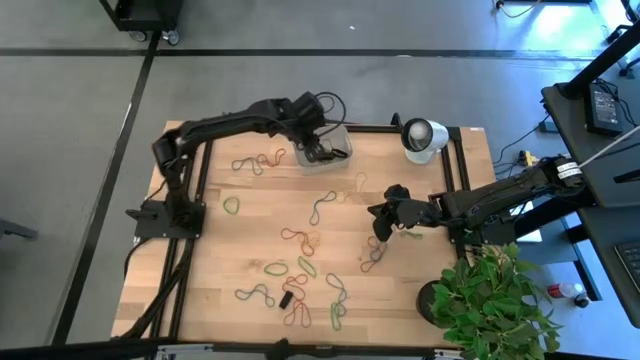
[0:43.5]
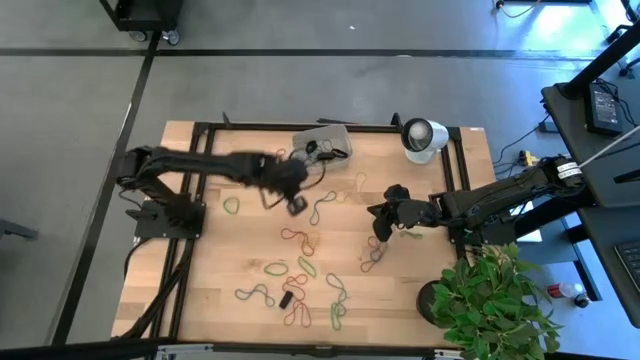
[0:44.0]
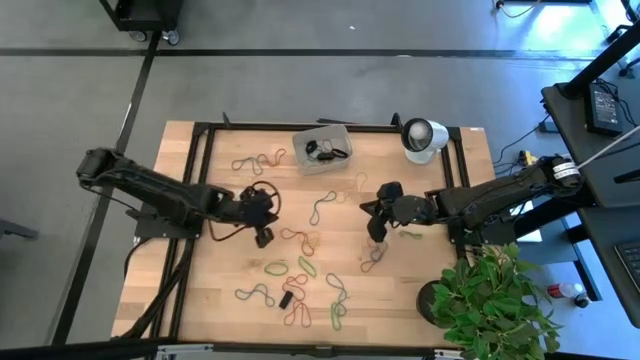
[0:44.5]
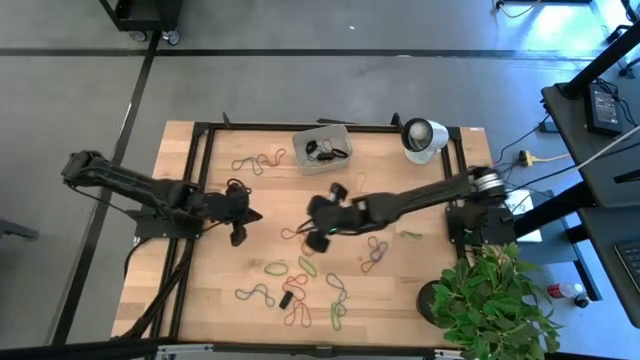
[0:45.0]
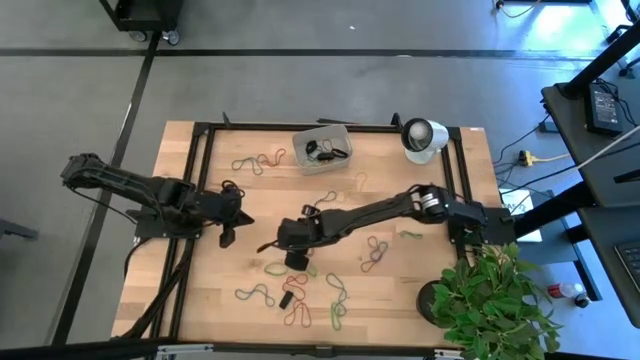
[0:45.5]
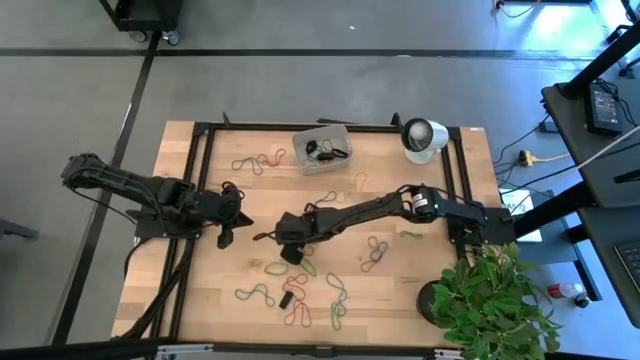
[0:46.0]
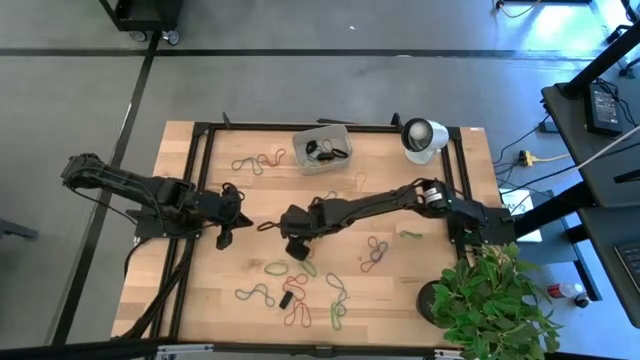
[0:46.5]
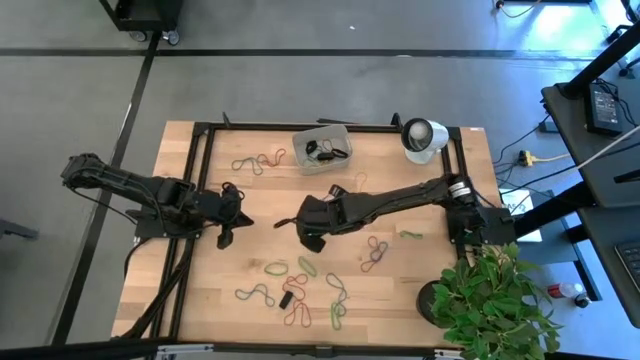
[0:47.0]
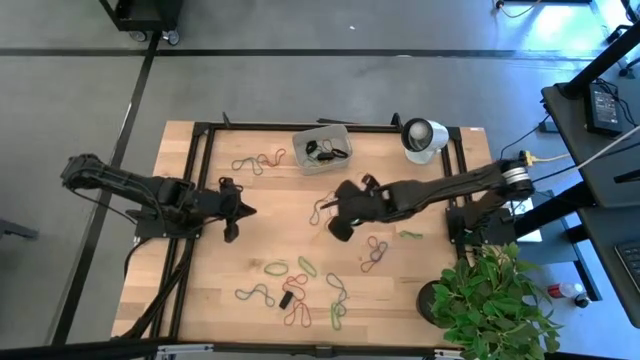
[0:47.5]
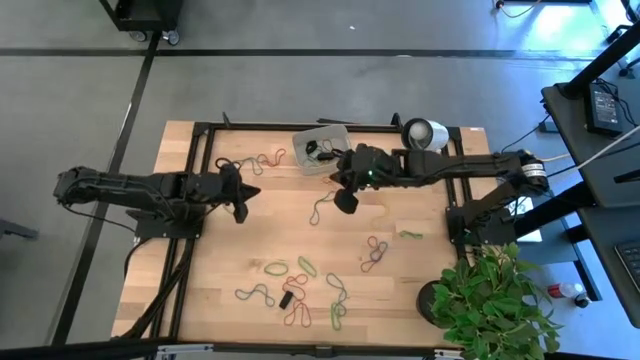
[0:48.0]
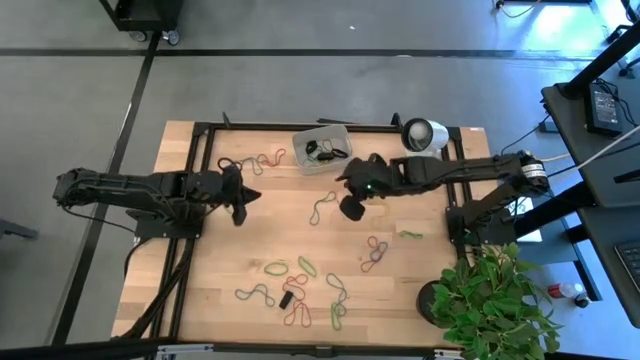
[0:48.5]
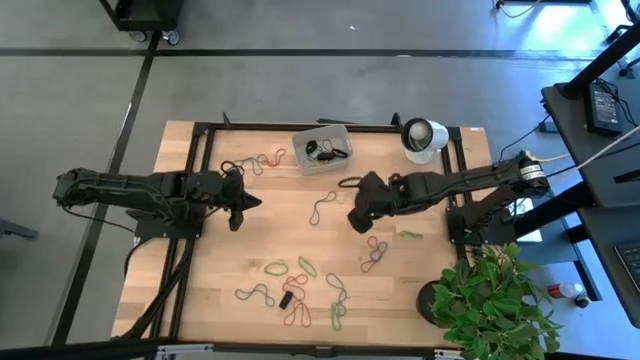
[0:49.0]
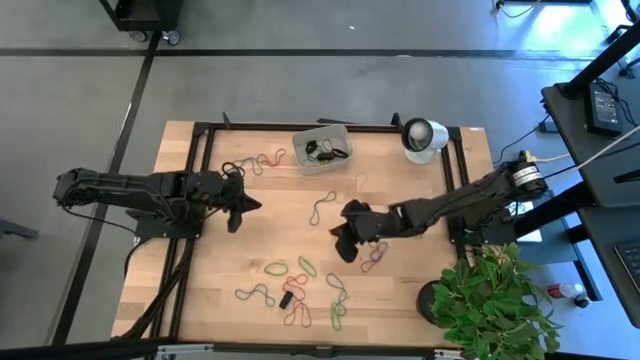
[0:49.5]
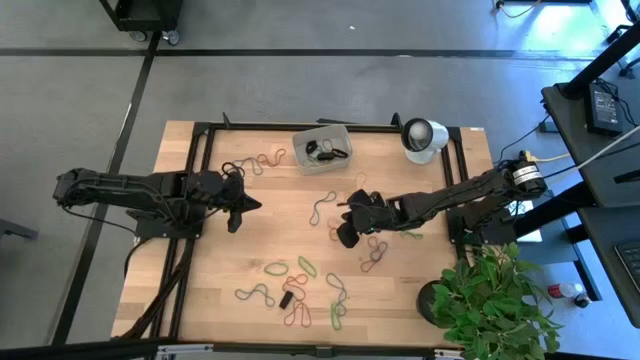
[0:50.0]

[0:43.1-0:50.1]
Task: Pick and place rubber bands into bin
Put the red rubber band into the gray bin

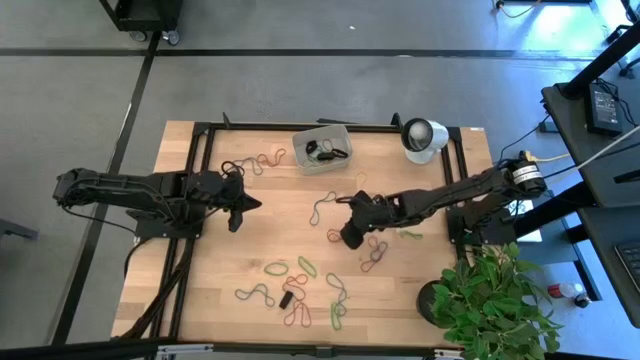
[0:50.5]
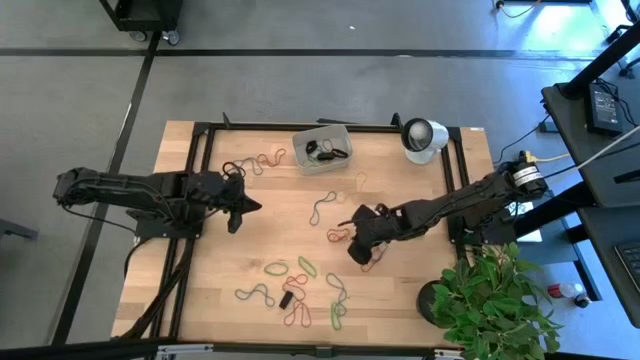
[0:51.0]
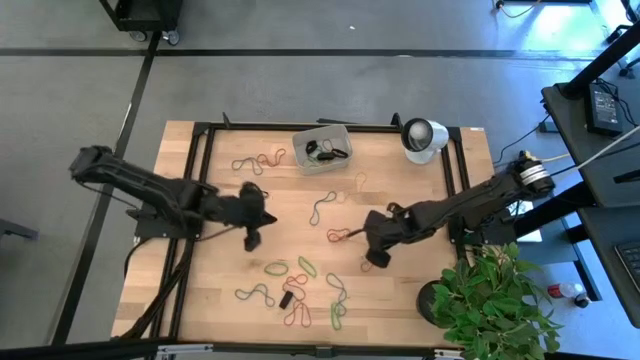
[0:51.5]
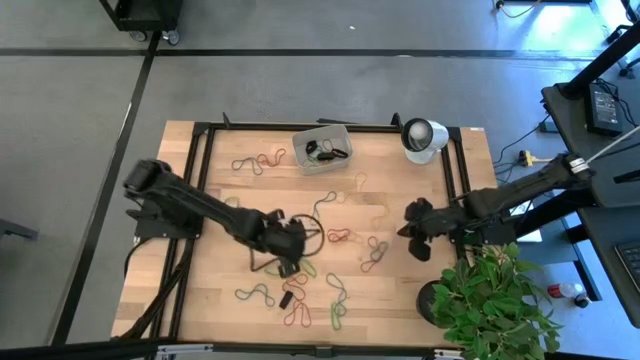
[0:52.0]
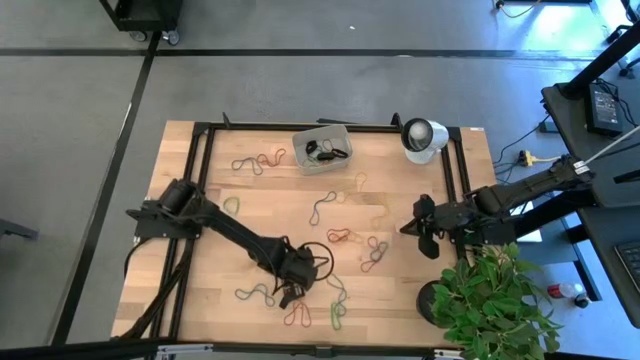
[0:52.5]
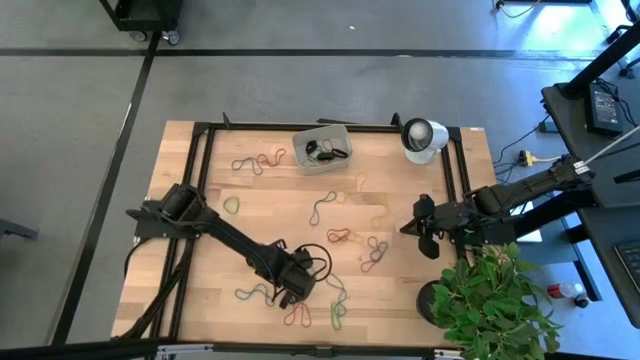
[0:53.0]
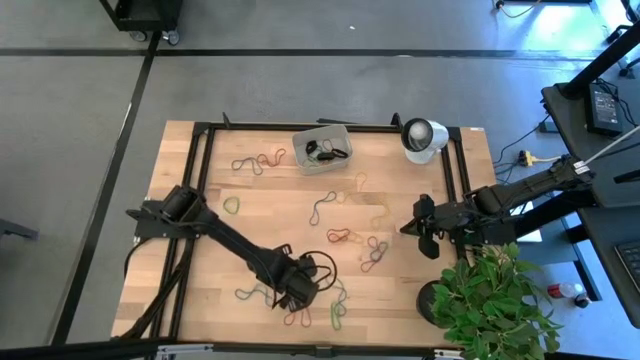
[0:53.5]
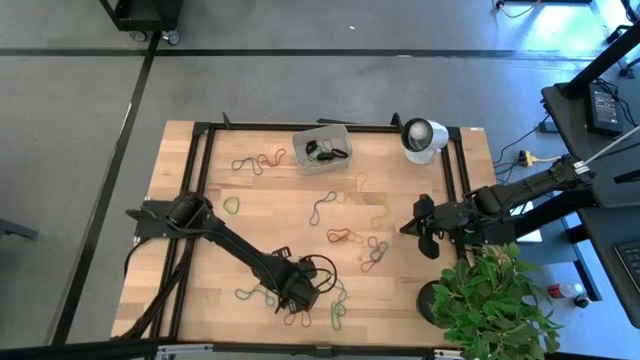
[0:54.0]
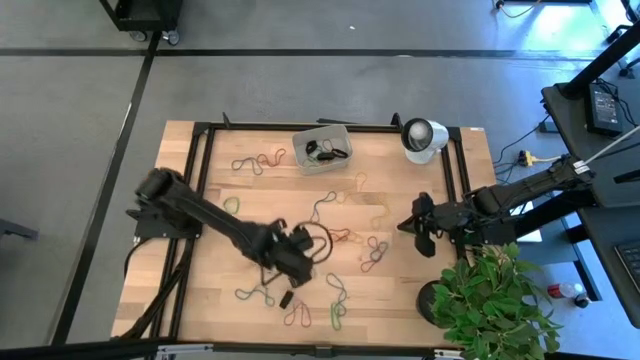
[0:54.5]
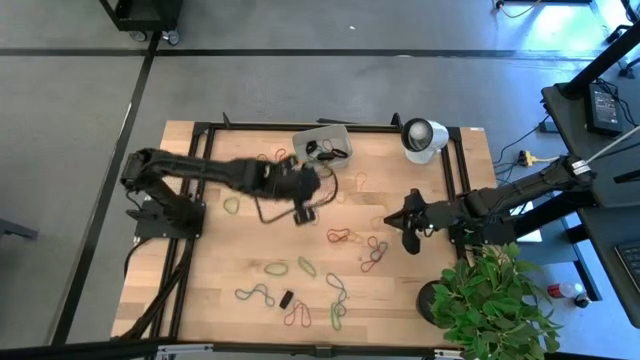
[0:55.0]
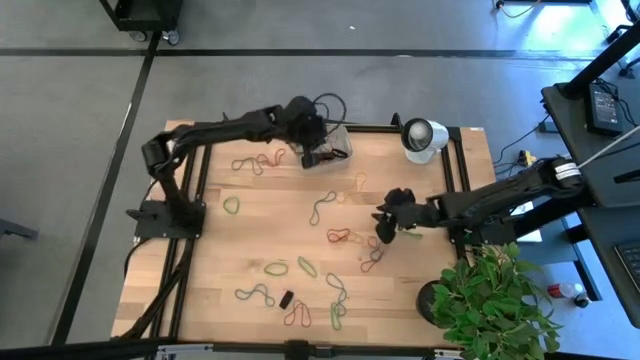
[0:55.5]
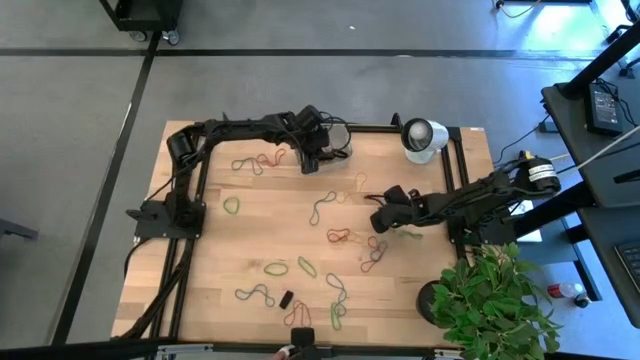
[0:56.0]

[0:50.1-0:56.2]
Put the red rubber band into the gray bin

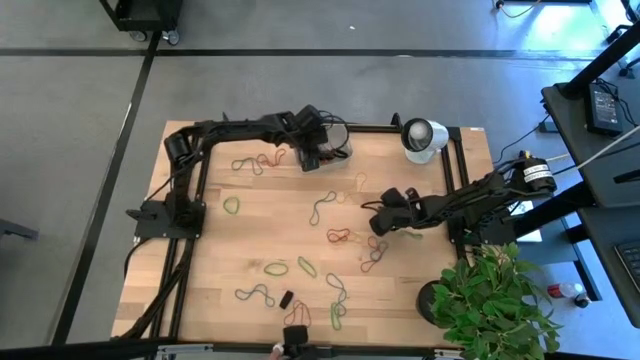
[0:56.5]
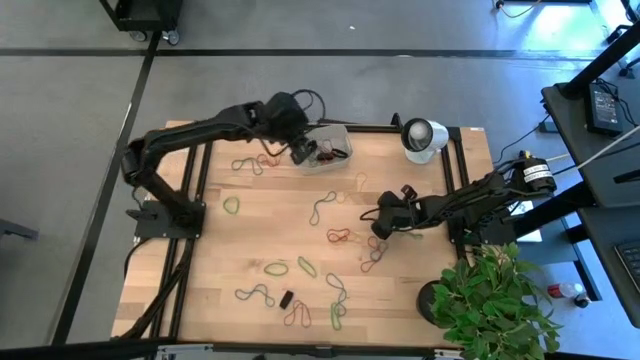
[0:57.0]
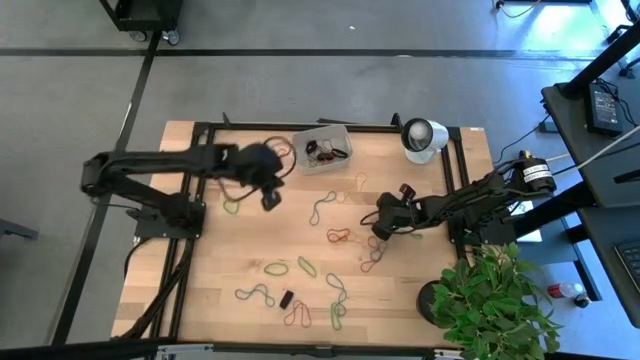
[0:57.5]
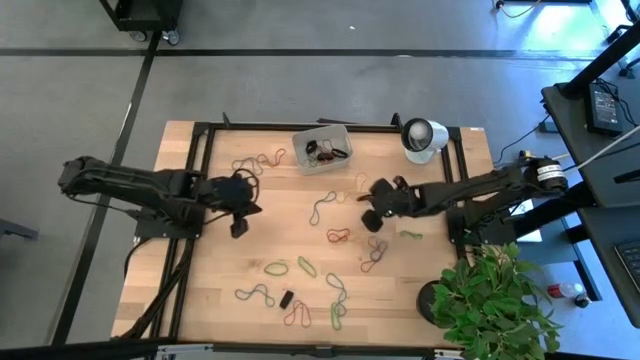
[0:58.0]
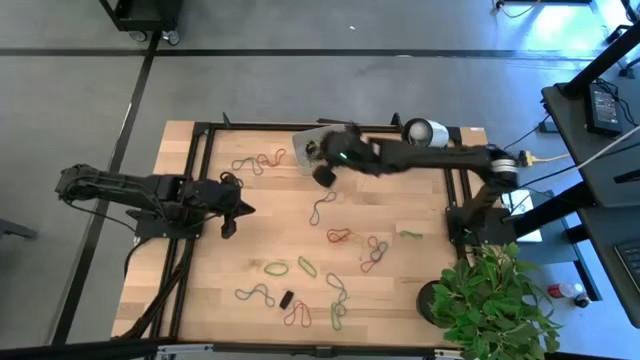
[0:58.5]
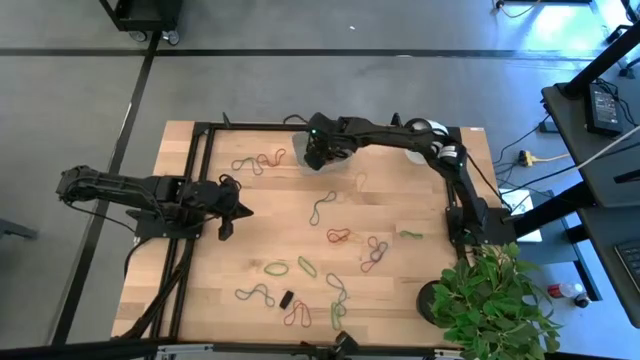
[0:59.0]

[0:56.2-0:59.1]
Put the middle yellow rubber band into the gray bin

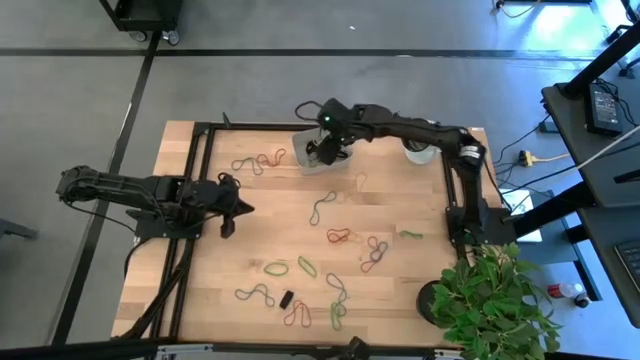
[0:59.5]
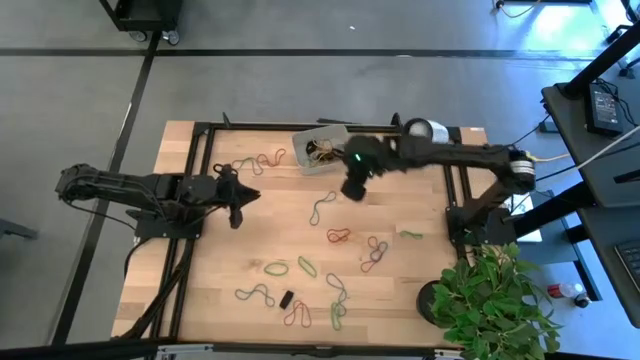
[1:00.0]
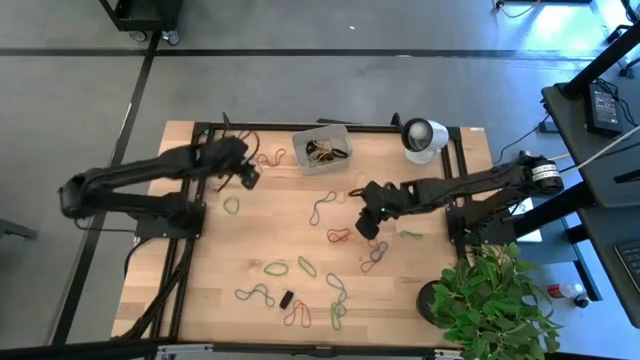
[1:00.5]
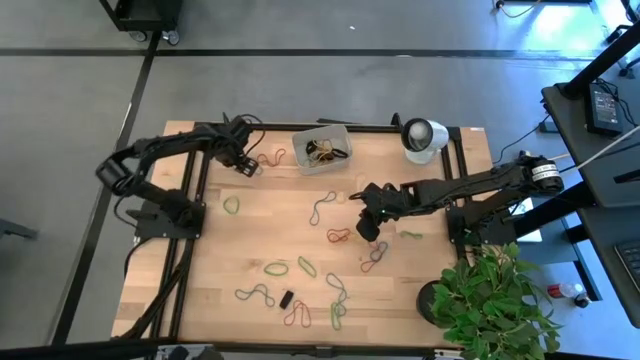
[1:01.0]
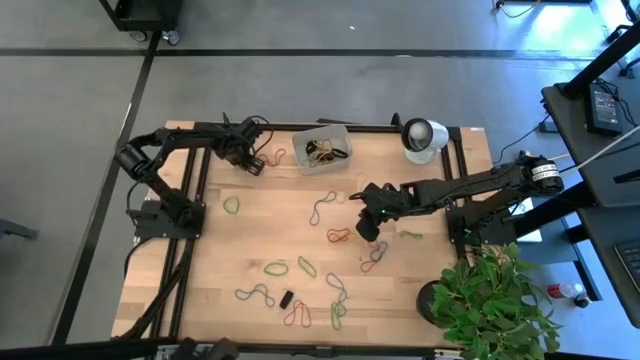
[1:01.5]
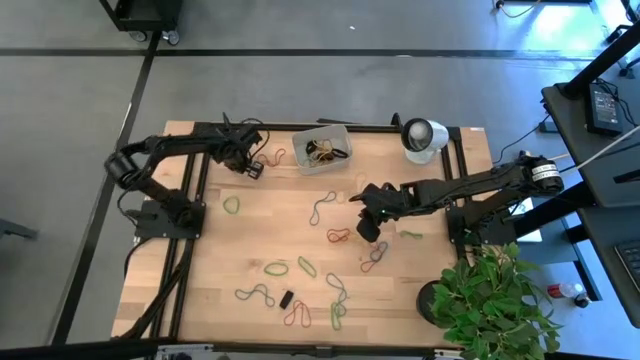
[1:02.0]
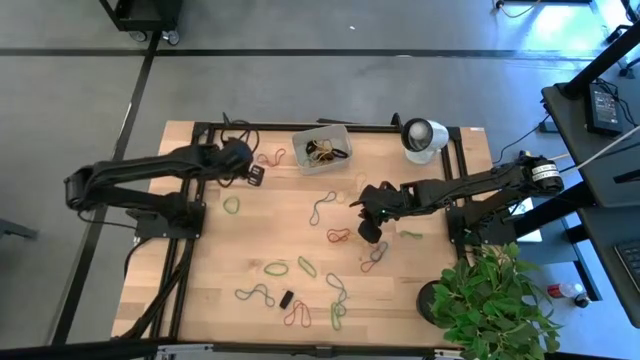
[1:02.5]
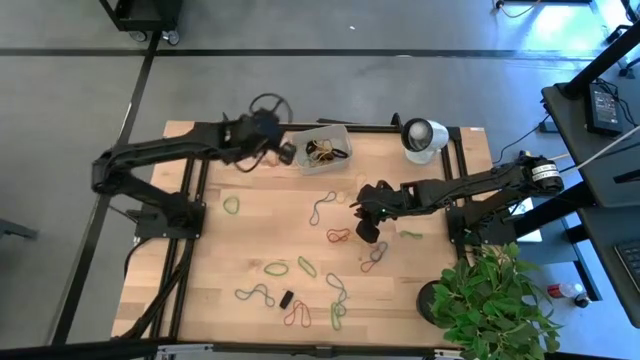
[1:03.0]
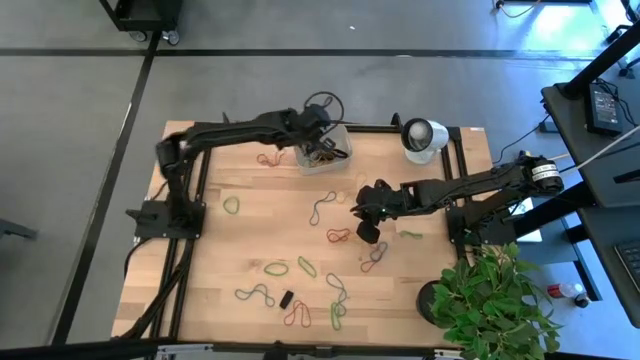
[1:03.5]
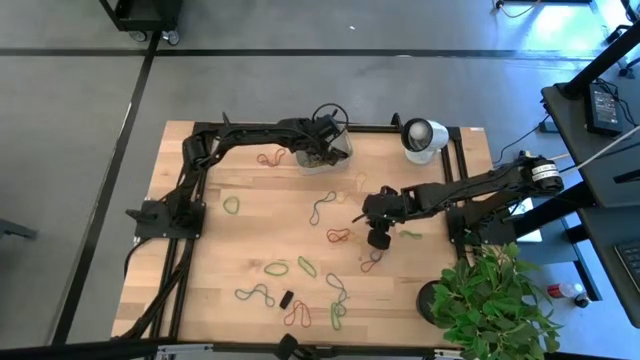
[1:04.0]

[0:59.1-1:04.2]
Put the blue rubber band into the gray bin
